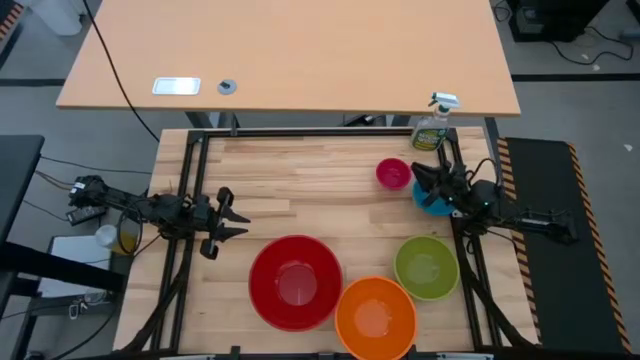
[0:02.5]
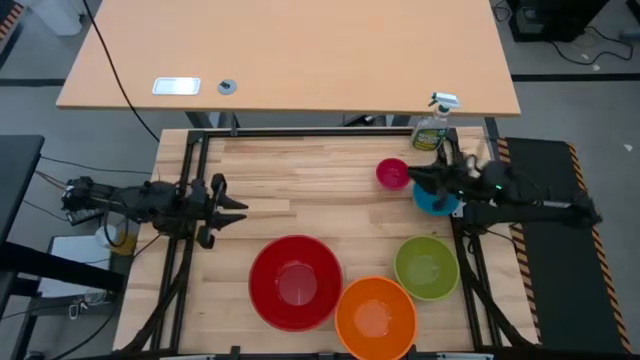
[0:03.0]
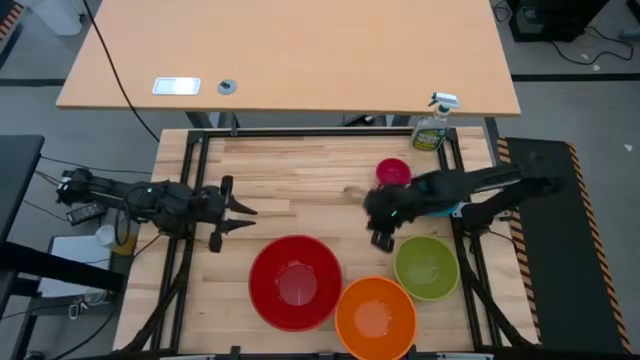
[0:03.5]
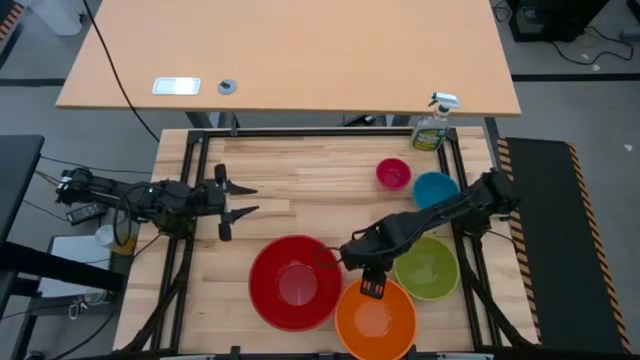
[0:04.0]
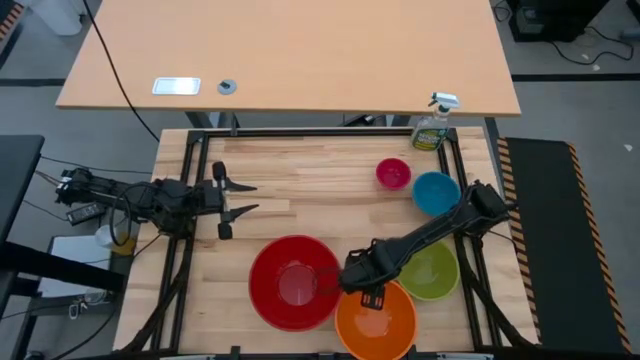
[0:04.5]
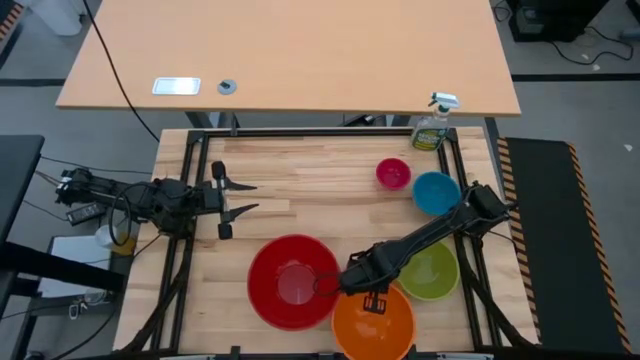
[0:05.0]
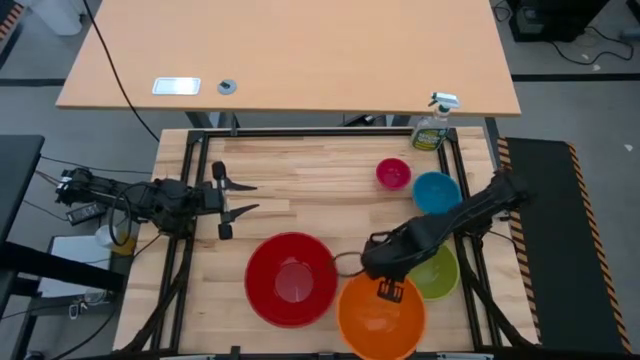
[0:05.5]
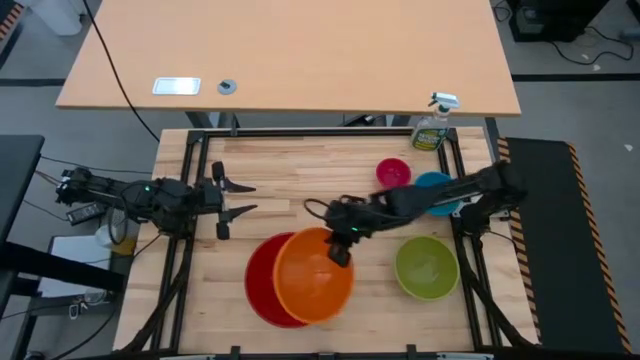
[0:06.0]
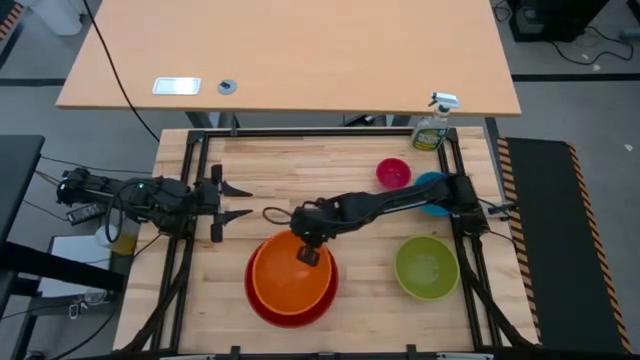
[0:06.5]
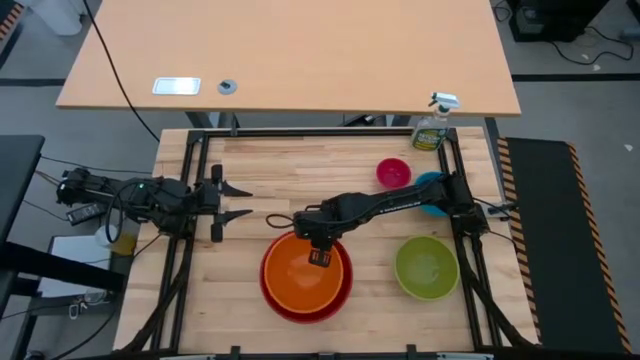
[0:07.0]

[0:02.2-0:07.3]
Stack the orange bowl into the large red bowl

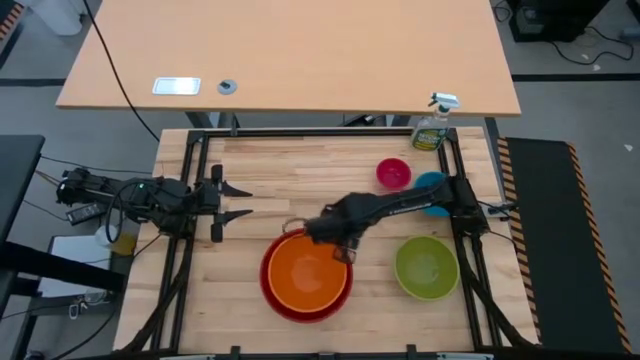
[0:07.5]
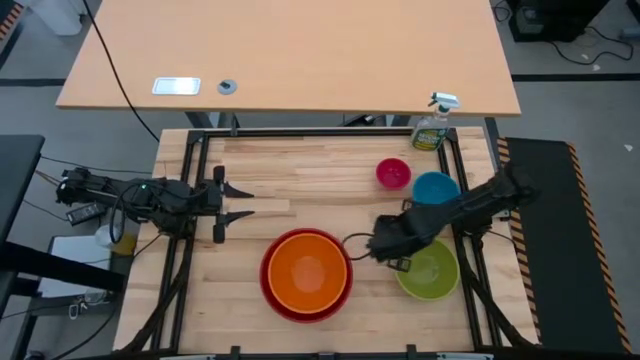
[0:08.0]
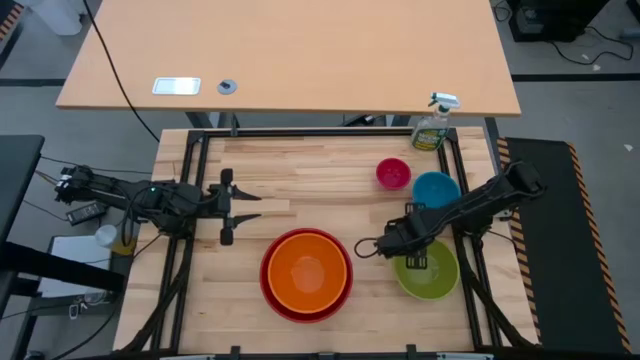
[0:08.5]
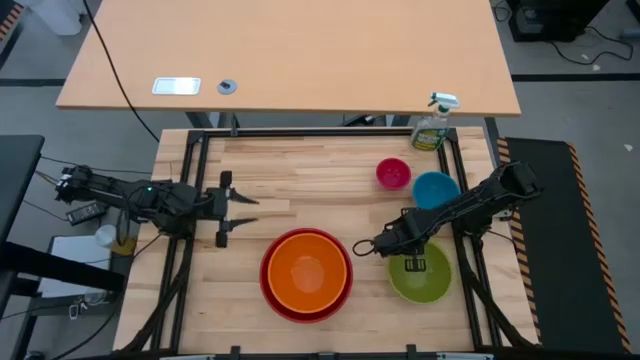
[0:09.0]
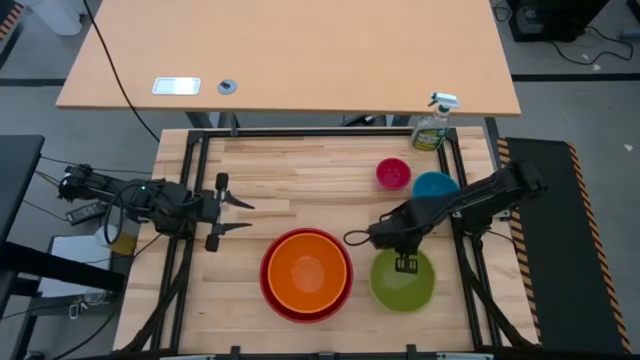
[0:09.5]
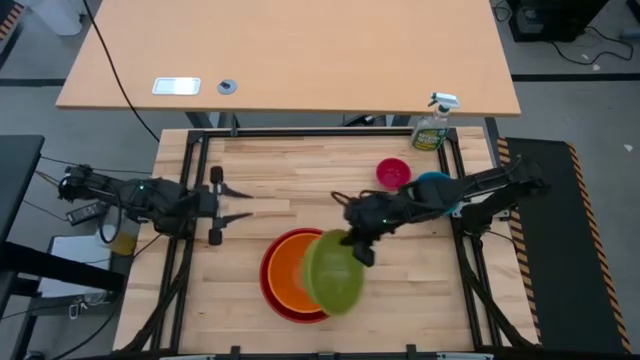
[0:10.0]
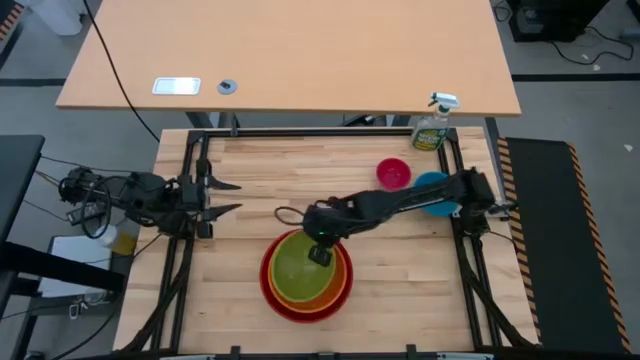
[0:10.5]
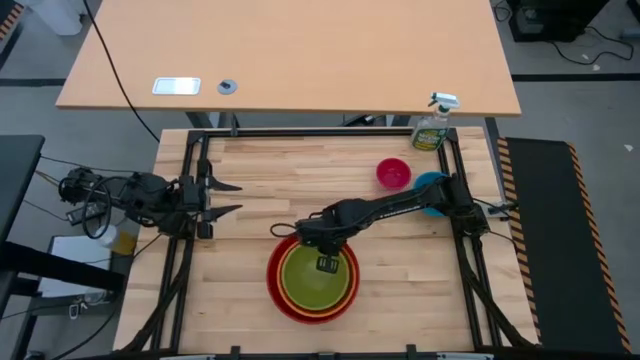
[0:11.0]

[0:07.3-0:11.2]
Stack the green bowl into the orange bowl

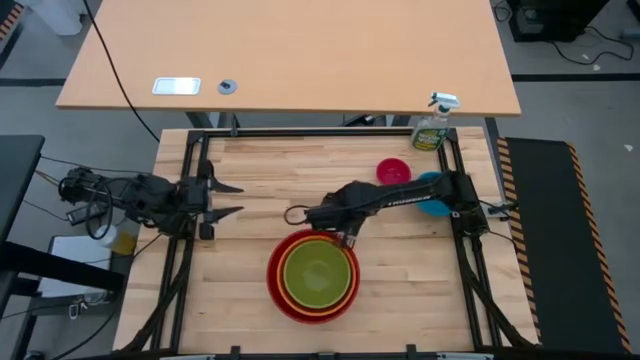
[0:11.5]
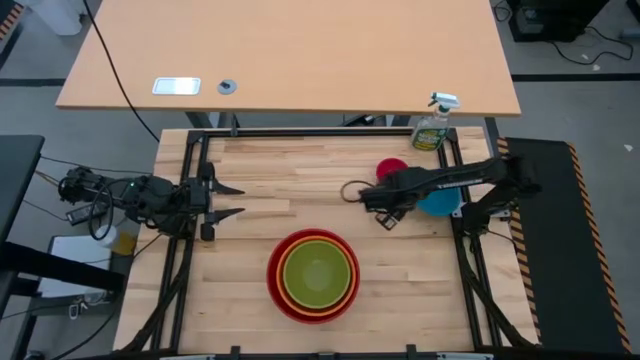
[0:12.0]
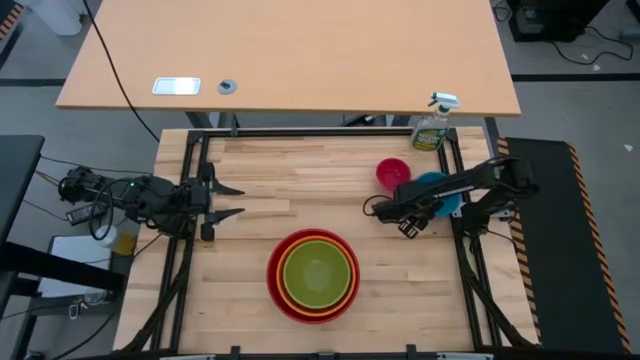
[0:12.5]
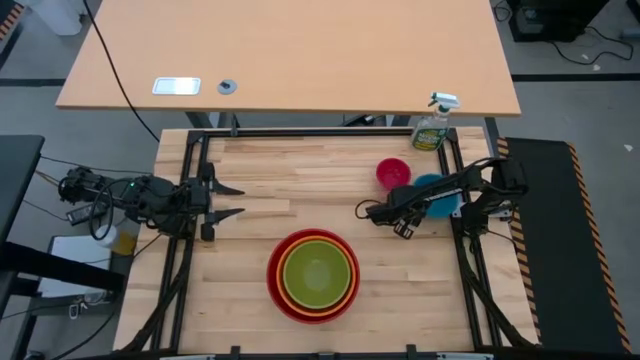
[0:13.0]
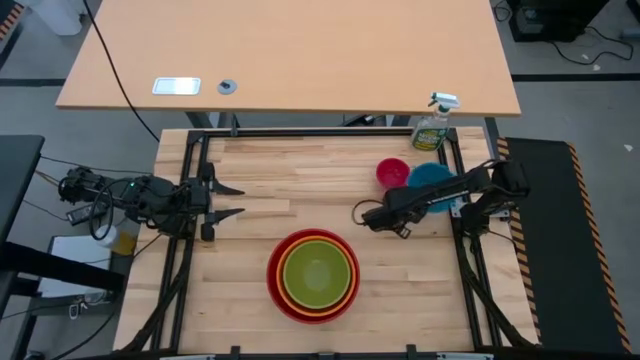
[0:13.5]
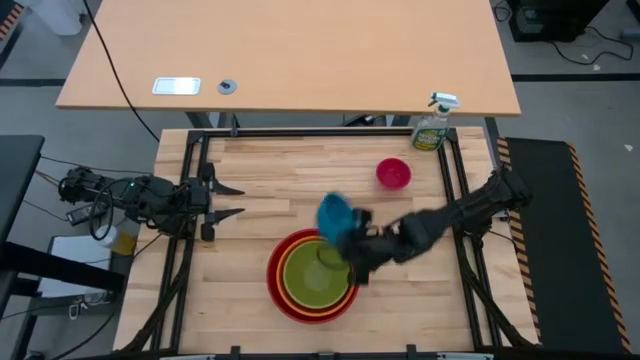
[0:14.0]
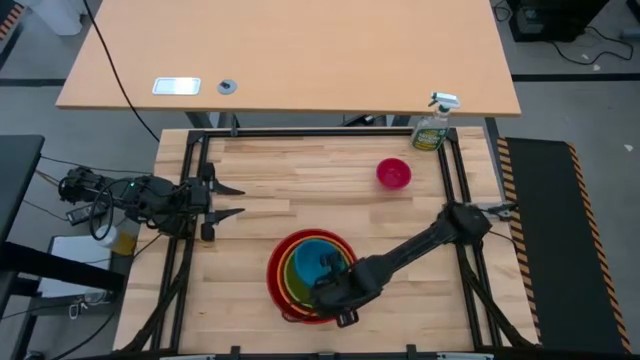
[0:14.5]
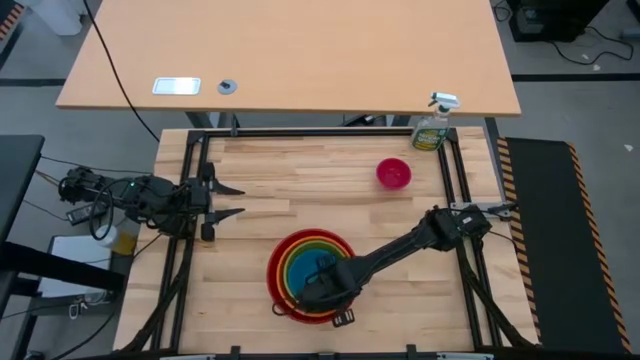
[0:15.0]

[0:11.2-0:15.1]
Stack the blue bowl into the green bowl

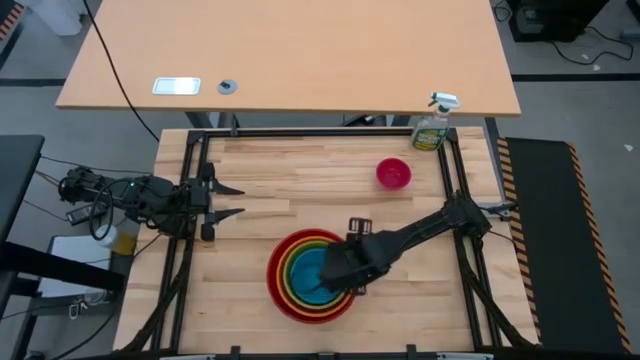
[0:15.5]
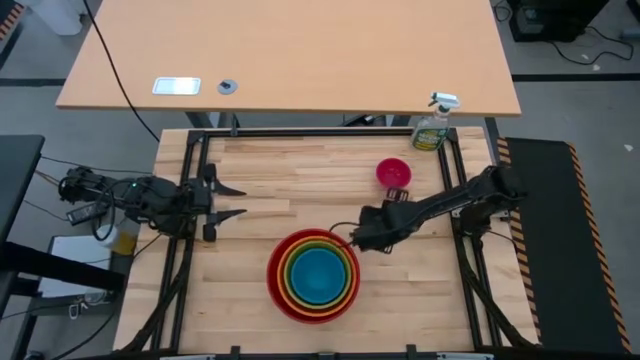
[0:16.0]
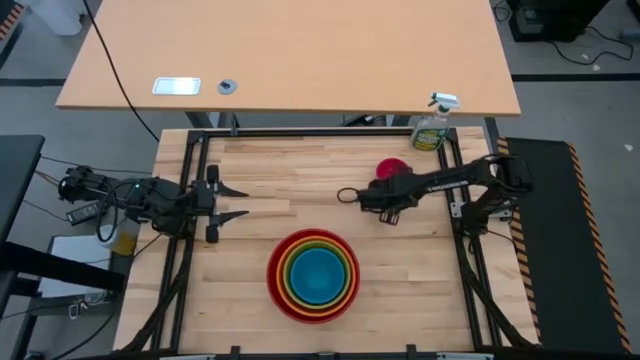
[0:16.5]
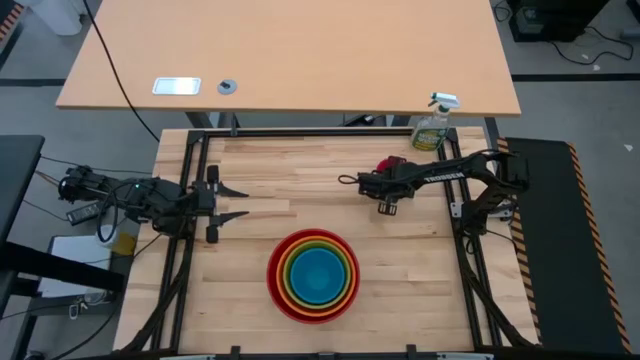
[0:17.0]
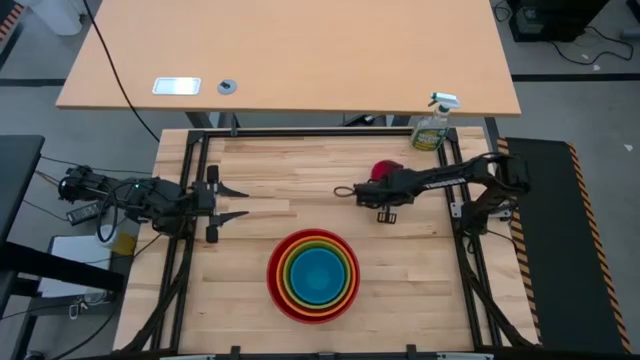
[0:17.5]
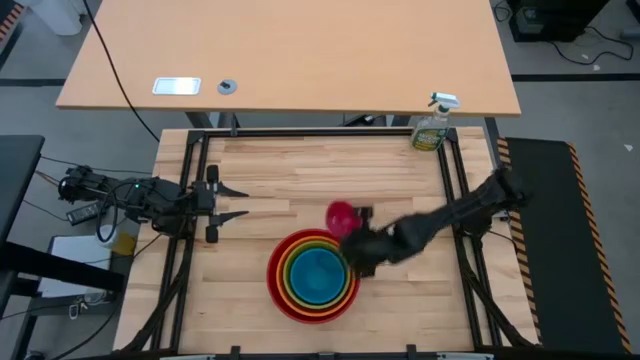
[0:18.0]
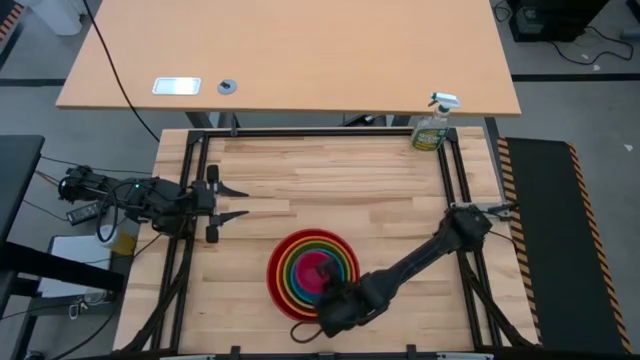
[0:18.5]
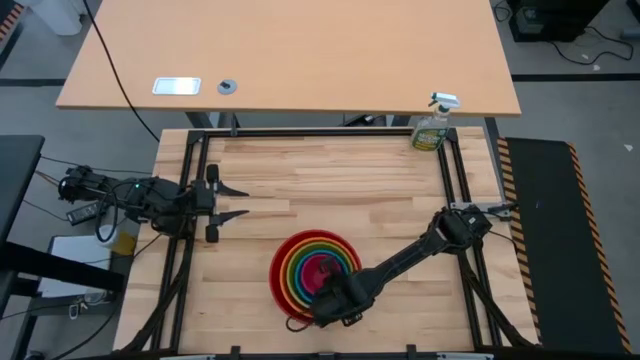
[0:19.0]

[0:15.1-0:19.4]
Stack the small red bowl into the blue bowl
